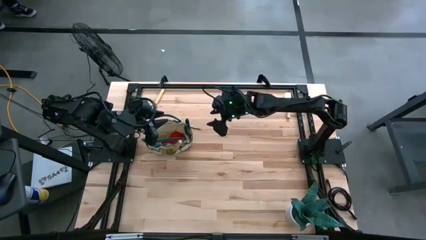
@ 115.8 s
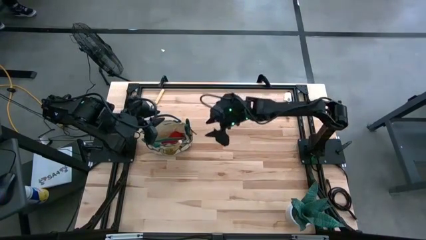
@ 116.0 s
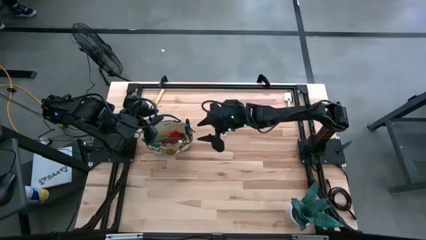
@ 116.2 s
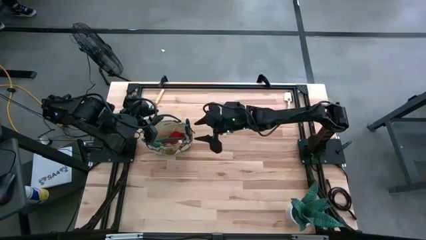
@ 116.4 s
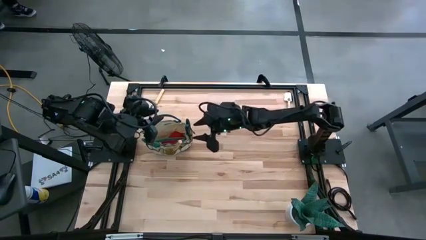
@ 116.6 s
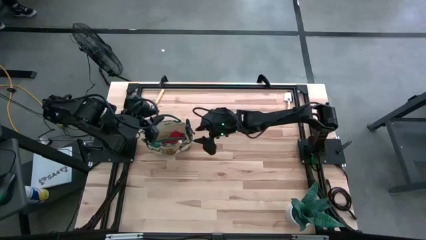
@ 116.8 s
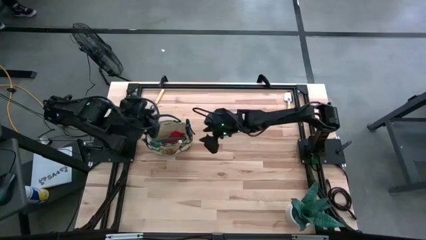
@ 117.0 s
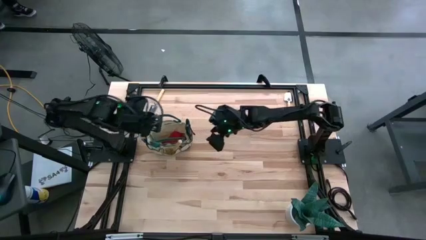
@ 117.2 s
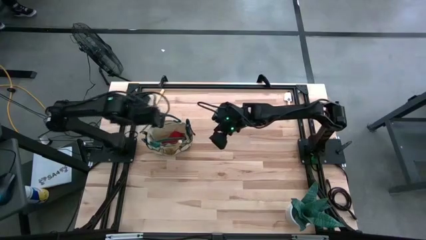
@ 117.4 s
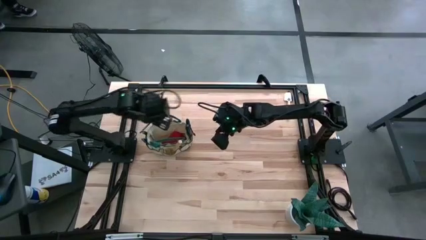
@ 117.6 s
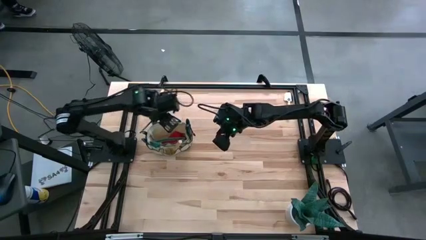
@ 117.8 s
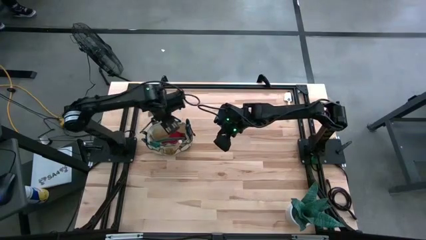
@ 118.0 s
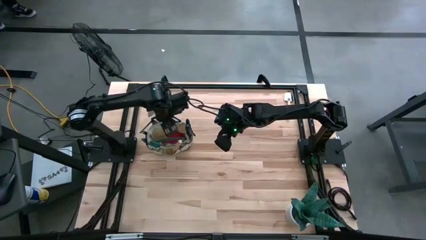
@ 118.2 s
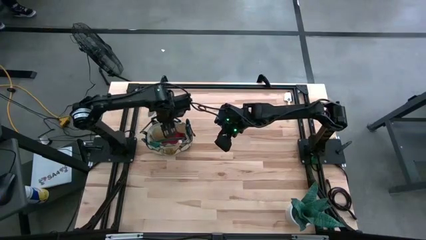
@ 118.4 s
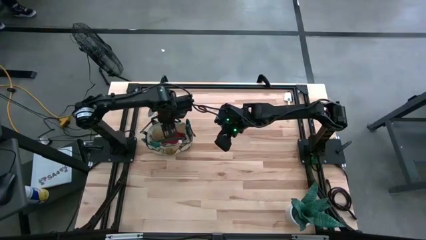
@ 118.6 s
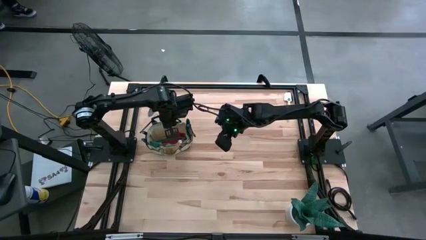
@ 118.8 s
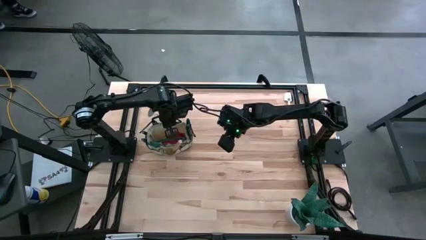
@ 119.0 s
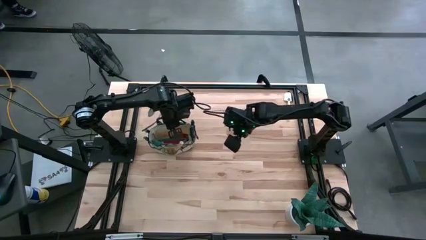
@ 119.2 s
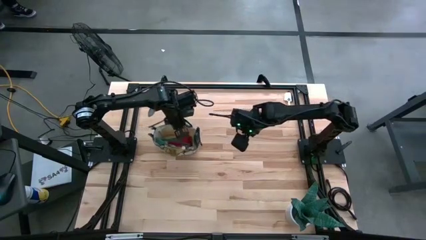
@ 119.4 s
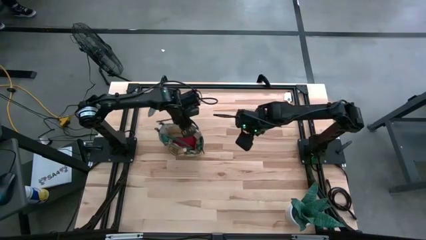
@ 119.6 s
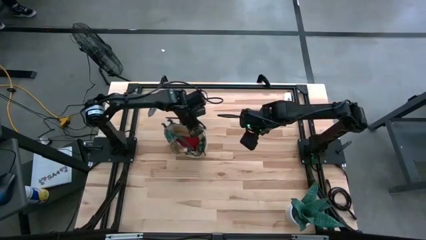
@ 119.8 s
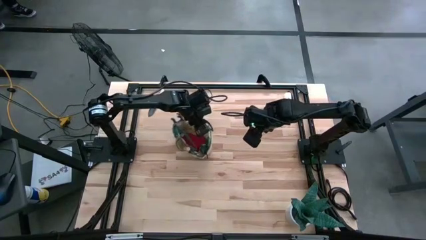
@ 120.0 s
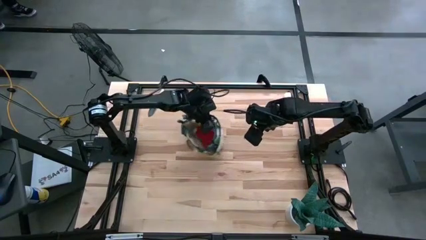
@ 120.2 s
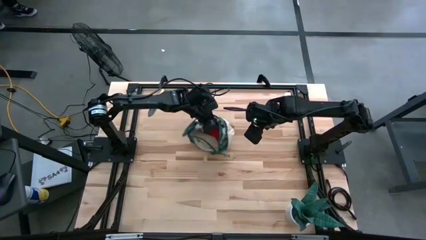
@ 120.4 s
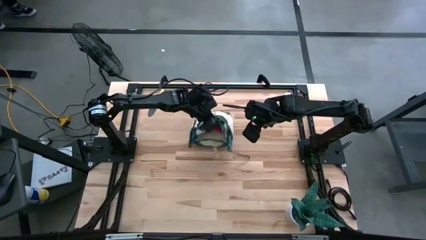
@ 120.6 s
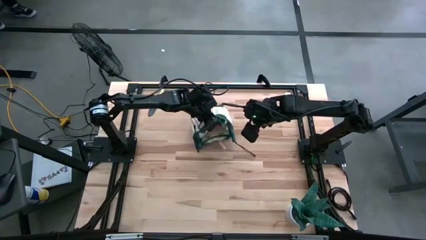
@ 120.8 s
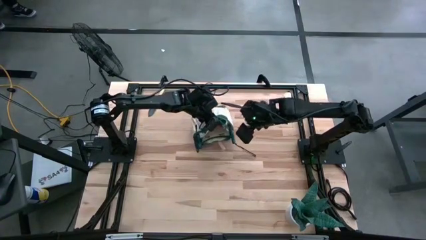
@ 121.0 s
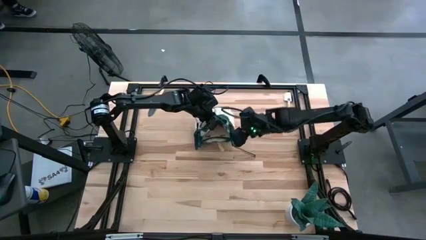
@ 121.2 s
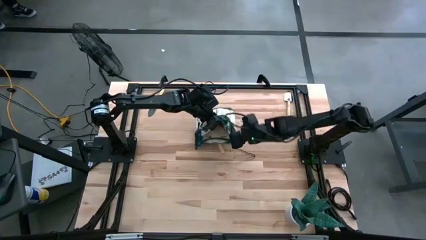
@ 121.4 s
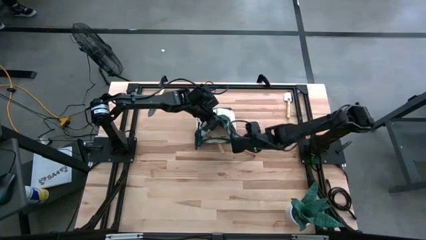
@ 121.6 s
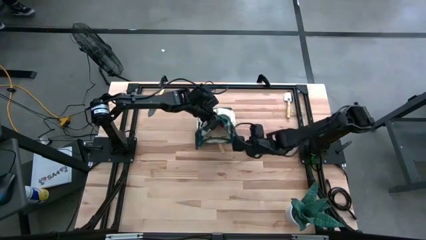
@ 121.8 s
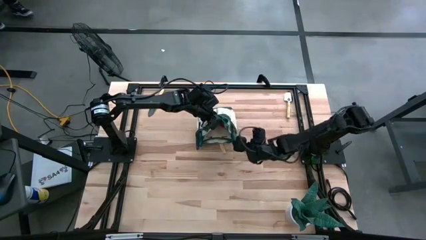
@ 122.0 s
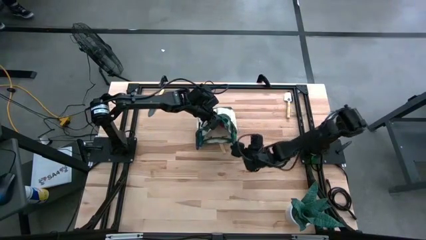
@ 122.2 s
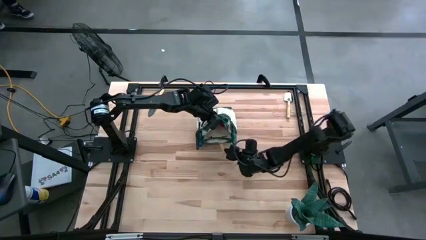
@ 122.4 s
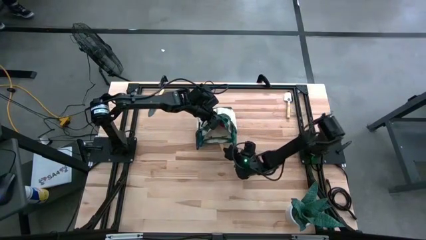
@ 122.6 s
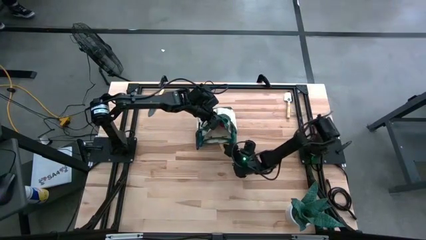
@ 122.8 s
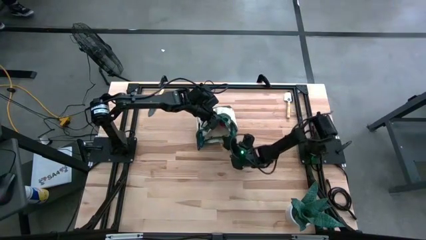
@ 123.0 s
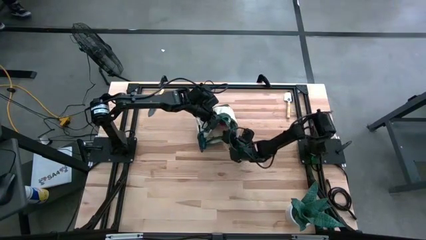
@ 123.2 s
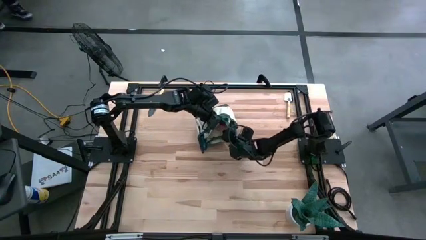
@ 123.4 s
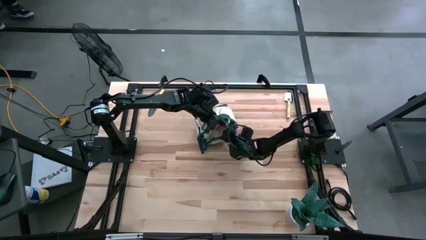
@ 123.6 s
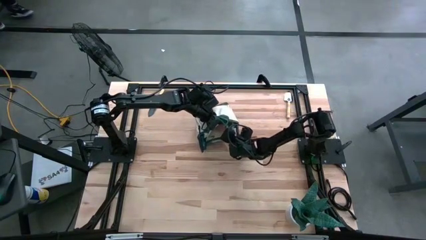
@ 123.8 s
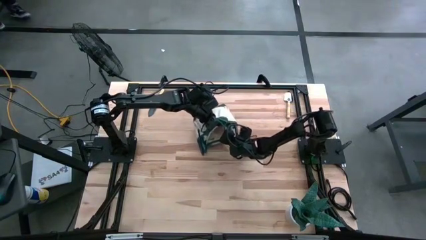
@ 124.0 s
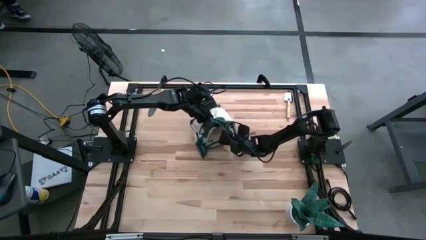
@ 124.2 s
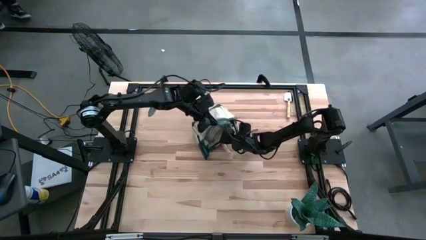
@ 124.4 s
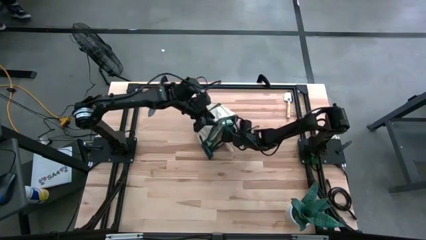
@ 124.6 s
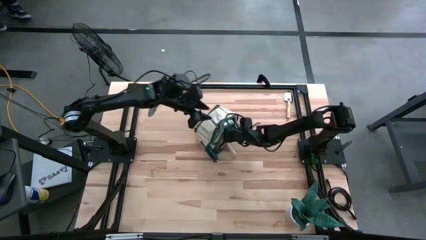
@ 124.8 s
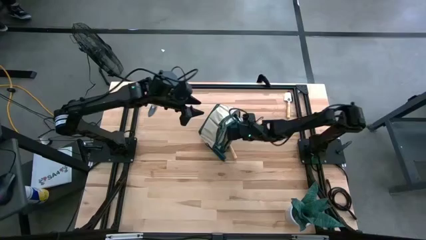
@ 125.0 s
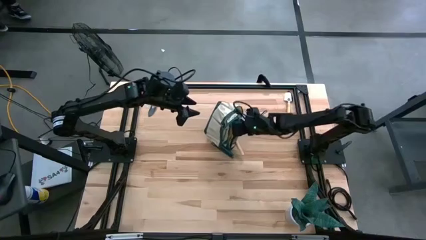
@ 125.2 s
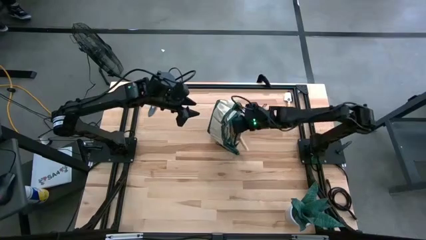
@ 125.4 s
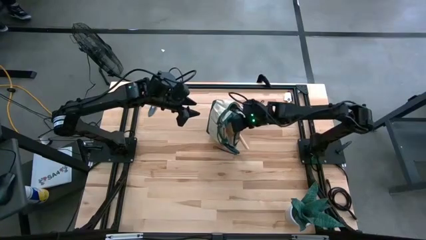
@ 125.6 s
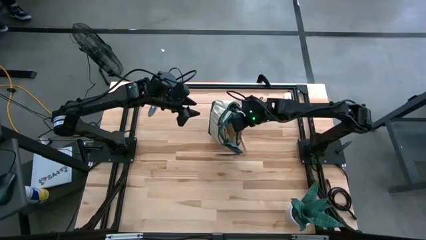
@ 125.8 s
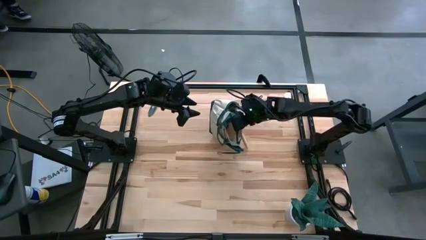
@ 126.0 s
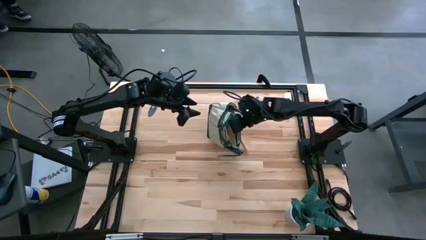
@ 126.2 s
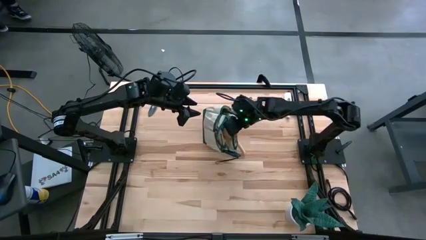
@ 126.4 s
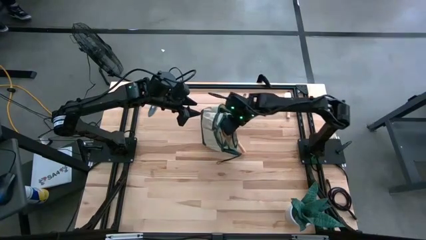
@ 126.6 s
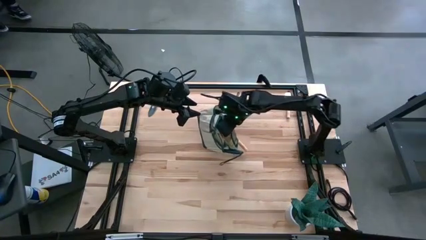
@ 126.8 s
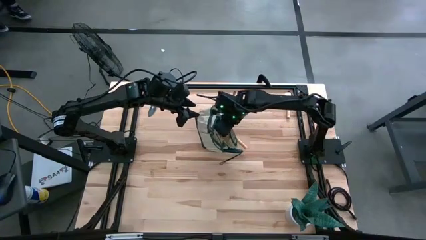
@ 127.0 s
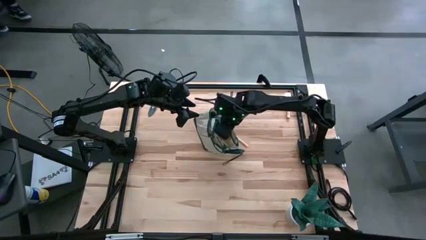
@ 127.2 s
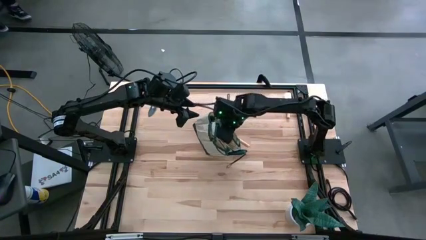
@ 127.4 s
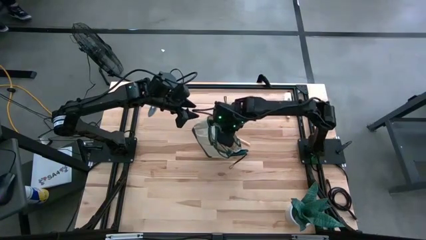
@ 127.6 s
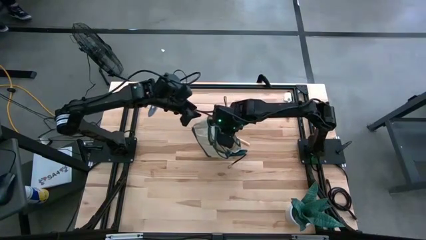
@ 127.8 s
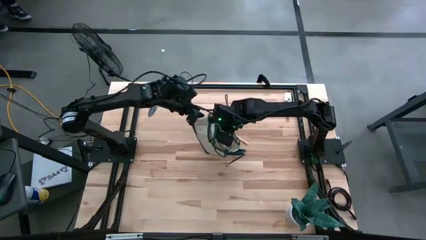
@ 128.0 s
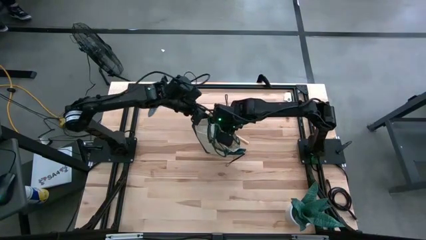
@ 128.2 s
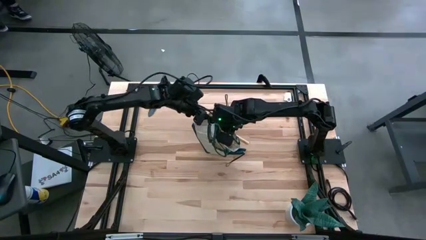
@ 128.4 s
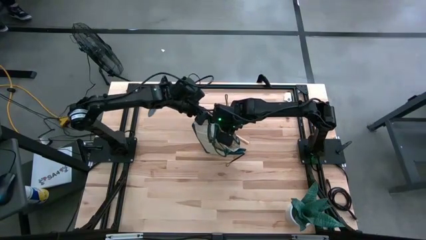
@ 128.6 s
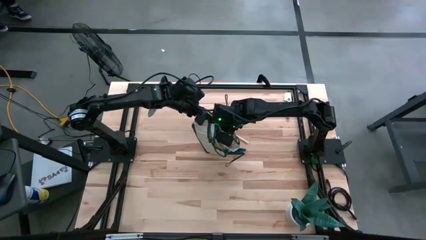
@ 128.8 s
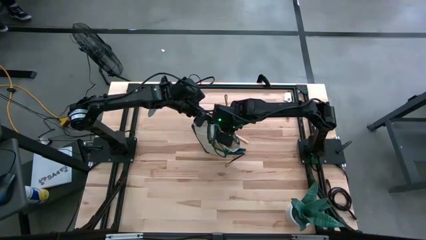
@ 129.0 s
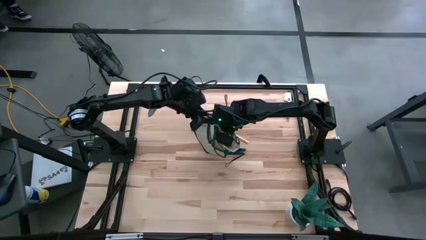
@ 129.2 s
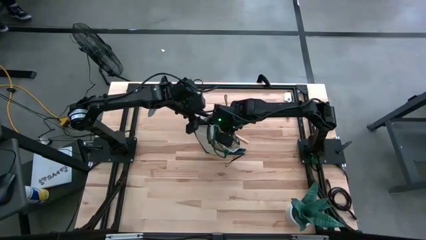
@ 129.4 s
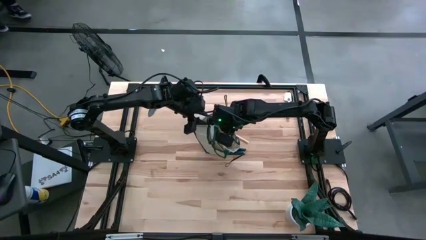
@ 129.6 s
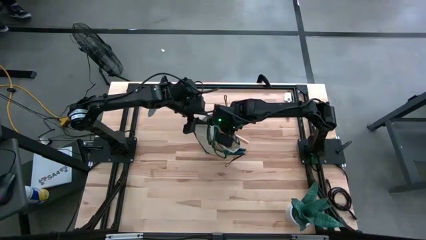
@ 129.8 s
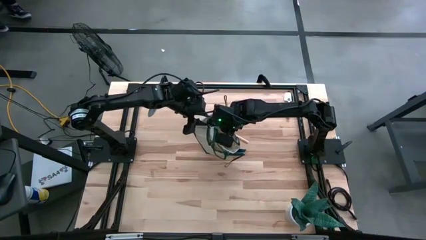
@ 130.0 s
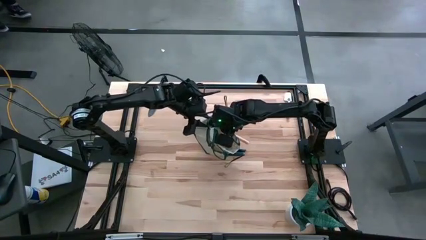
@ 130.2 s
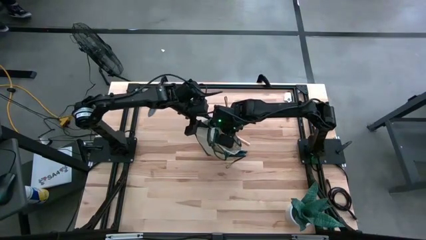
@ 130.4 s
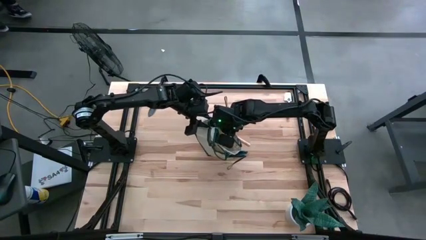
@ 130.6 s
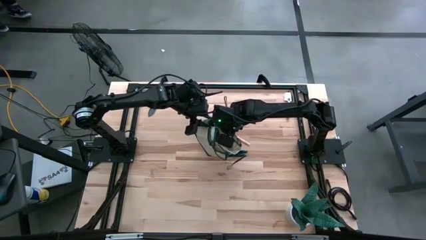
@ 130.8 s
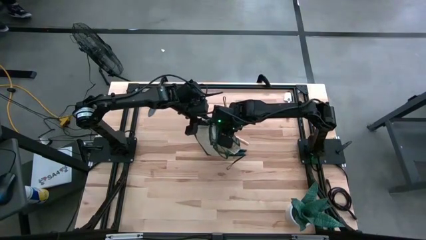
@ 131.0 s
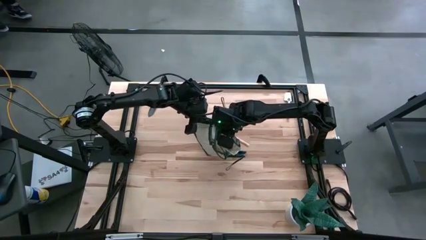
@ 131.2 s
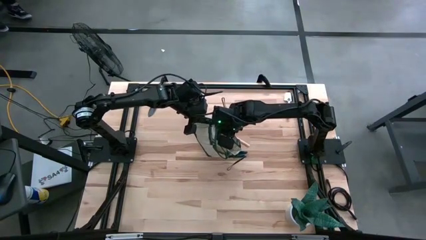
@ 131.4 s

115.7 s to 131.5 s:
Task: Pick & Place Garden tools in Gardening bag
Adjust the white gardening bag
